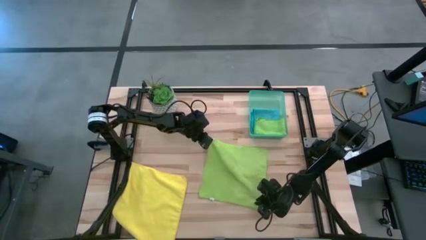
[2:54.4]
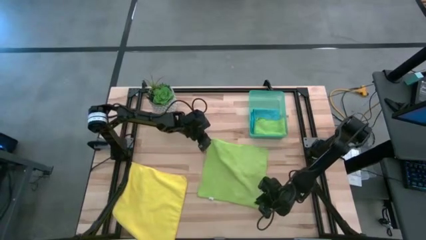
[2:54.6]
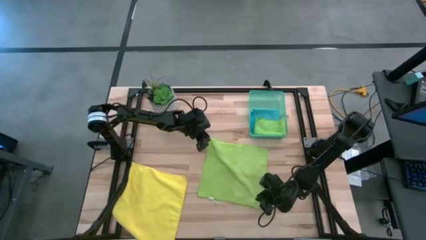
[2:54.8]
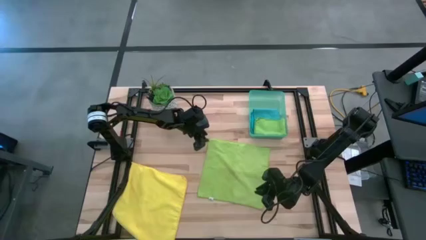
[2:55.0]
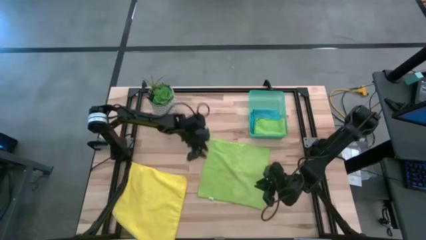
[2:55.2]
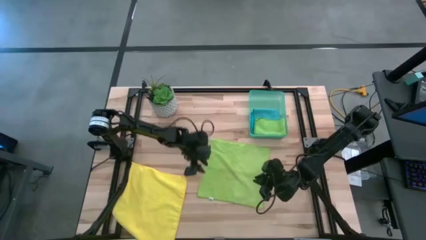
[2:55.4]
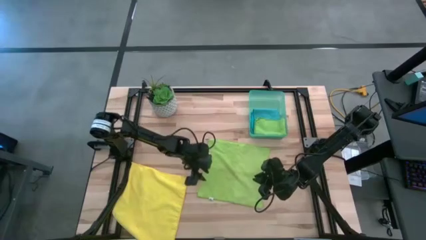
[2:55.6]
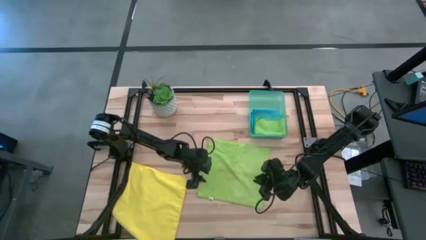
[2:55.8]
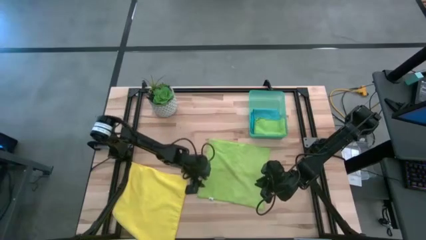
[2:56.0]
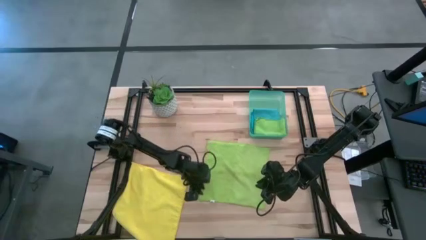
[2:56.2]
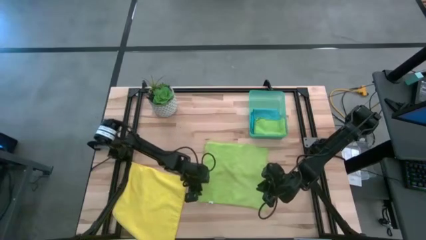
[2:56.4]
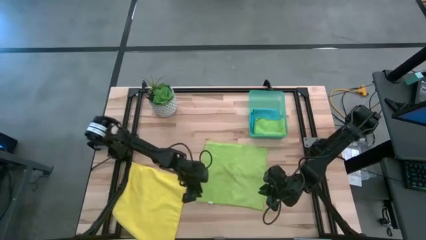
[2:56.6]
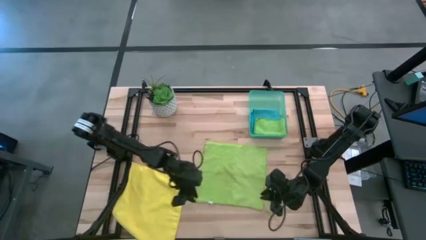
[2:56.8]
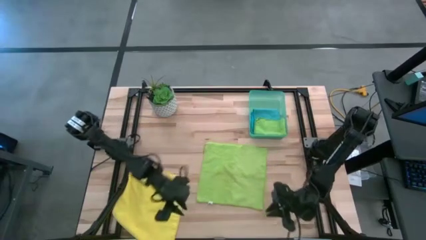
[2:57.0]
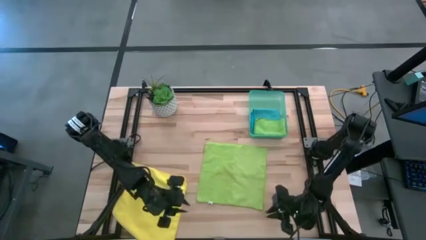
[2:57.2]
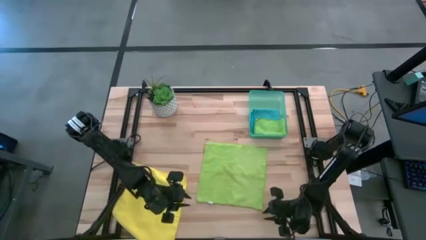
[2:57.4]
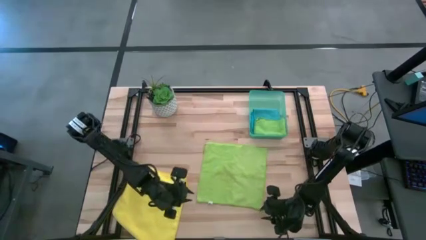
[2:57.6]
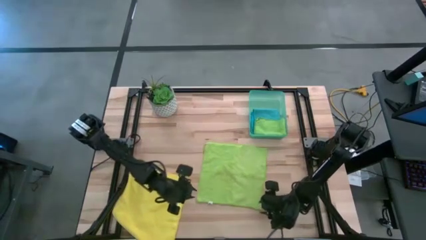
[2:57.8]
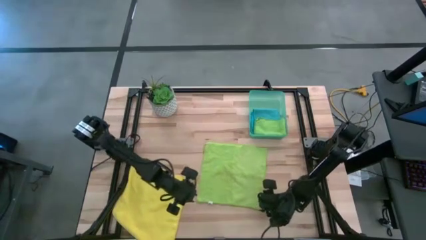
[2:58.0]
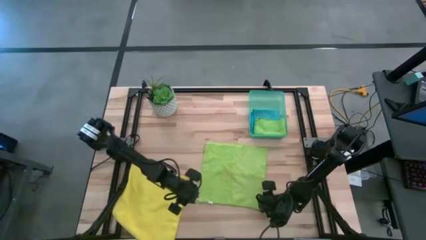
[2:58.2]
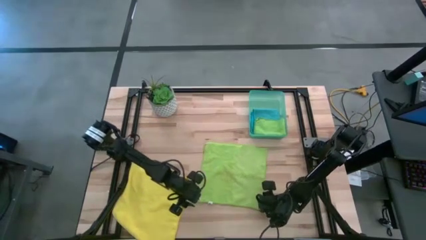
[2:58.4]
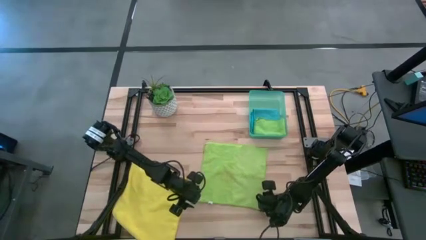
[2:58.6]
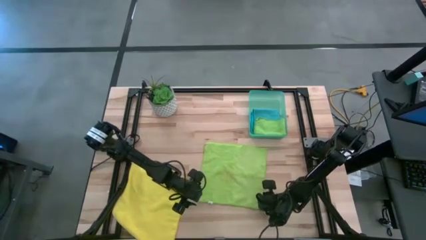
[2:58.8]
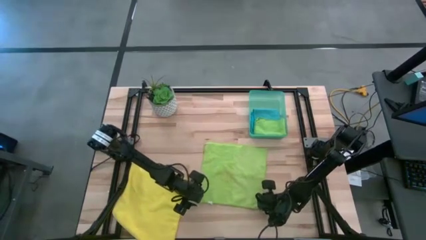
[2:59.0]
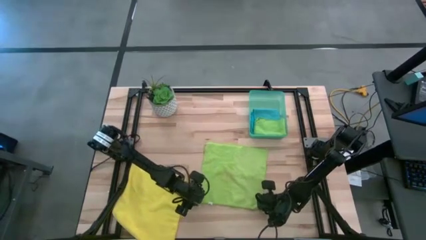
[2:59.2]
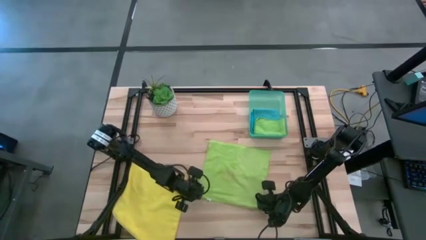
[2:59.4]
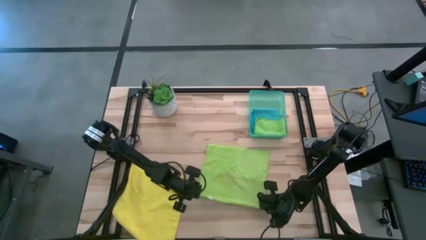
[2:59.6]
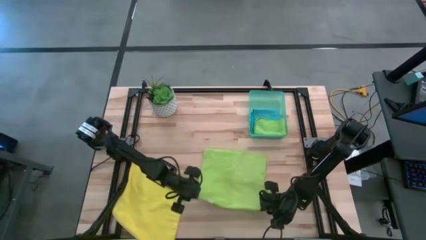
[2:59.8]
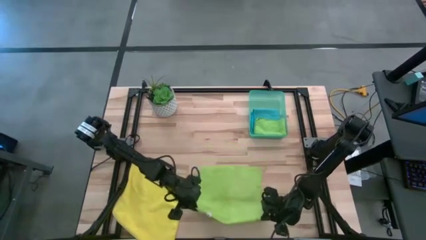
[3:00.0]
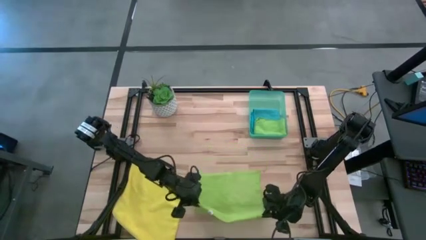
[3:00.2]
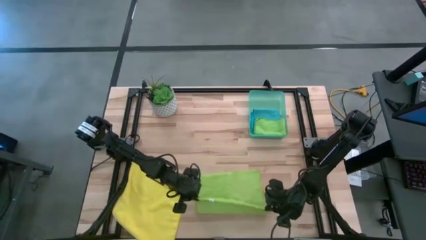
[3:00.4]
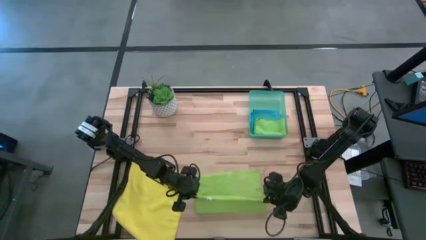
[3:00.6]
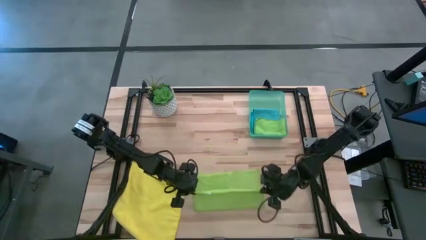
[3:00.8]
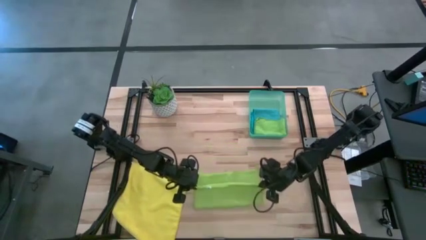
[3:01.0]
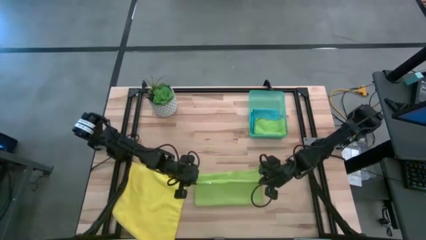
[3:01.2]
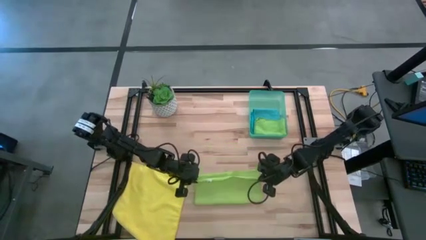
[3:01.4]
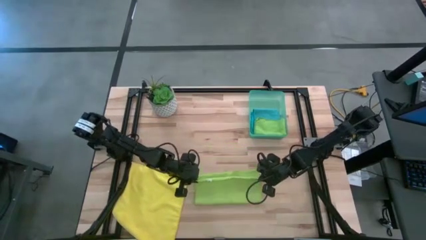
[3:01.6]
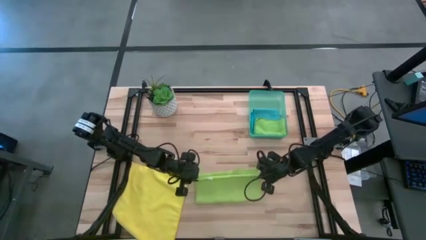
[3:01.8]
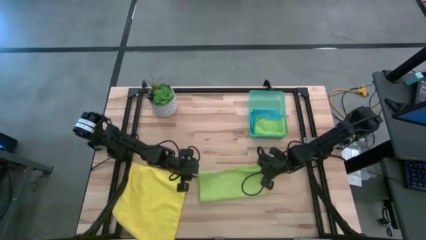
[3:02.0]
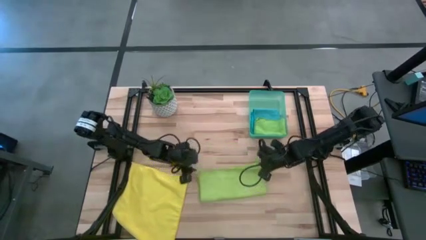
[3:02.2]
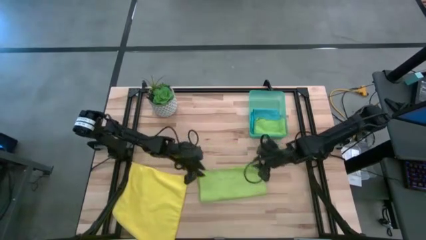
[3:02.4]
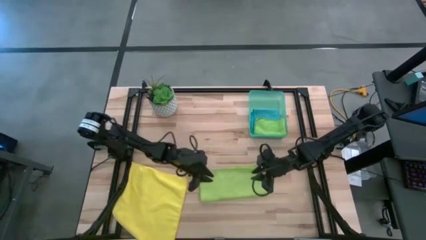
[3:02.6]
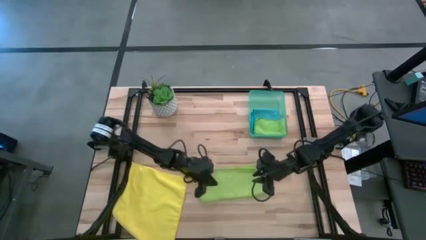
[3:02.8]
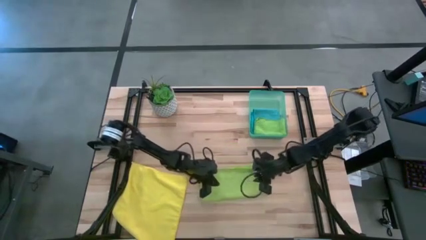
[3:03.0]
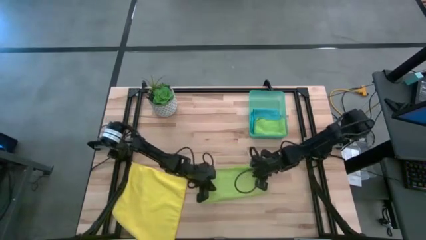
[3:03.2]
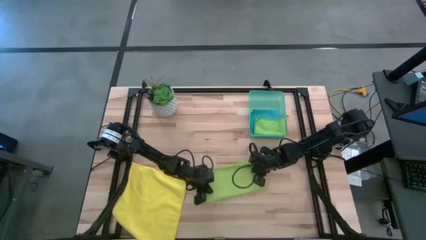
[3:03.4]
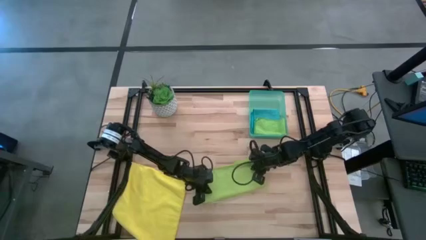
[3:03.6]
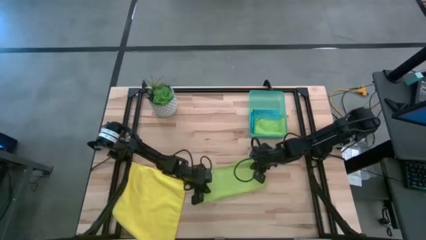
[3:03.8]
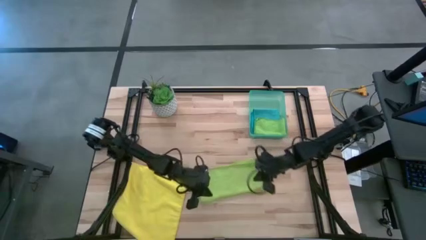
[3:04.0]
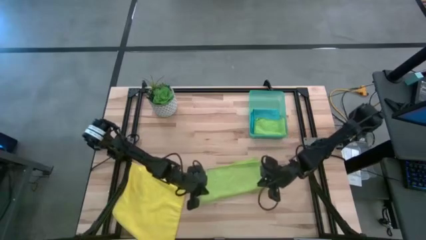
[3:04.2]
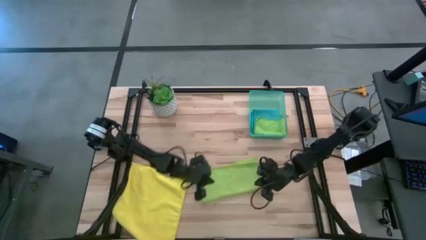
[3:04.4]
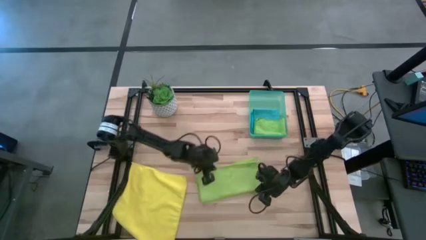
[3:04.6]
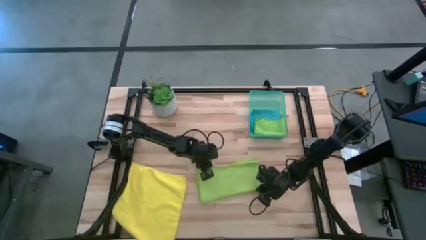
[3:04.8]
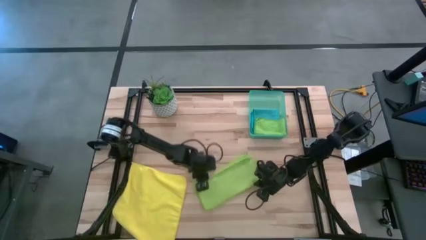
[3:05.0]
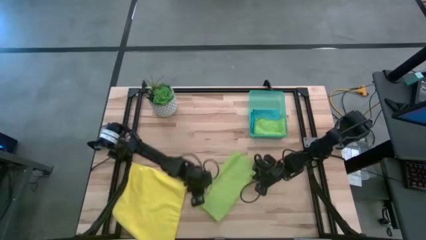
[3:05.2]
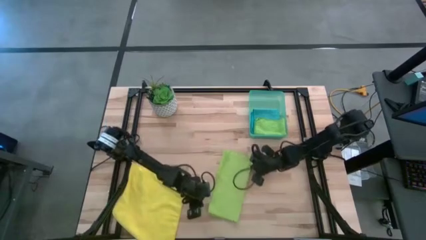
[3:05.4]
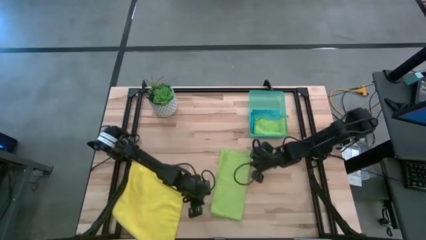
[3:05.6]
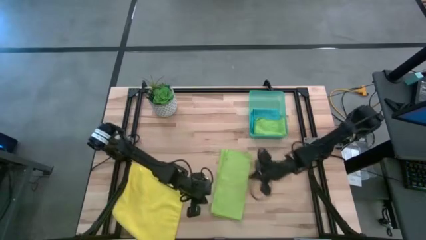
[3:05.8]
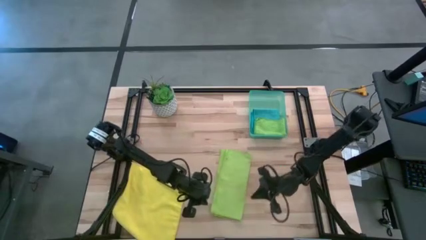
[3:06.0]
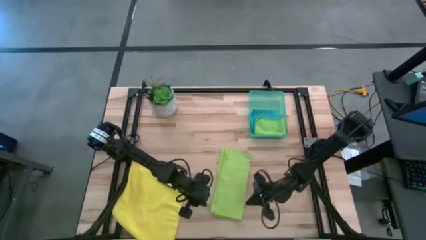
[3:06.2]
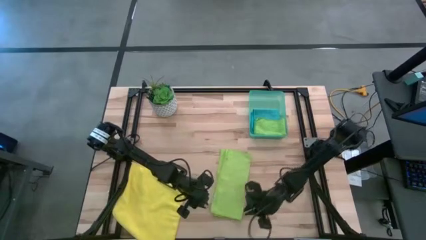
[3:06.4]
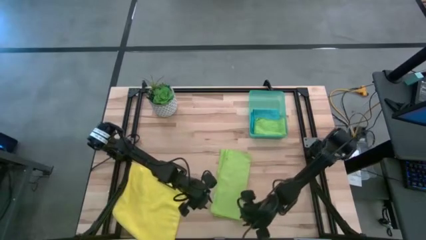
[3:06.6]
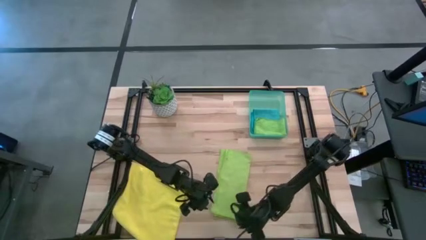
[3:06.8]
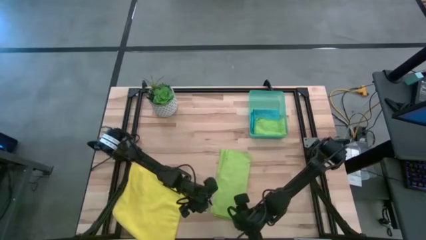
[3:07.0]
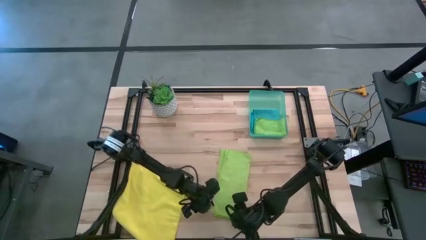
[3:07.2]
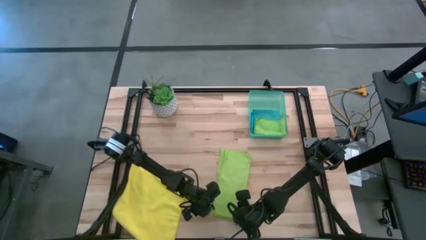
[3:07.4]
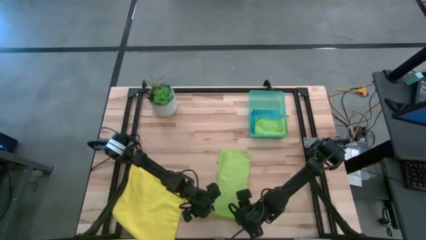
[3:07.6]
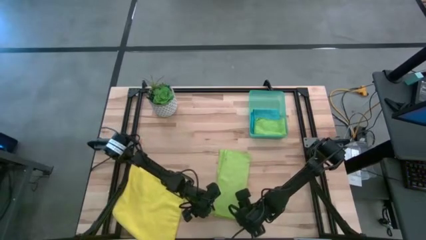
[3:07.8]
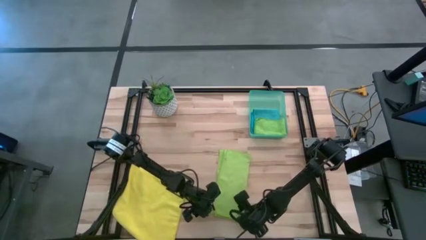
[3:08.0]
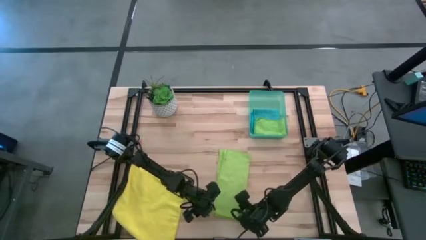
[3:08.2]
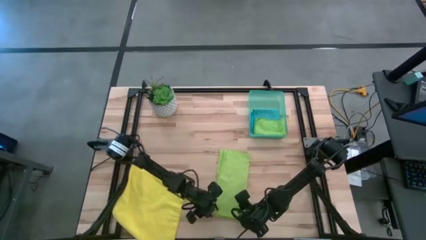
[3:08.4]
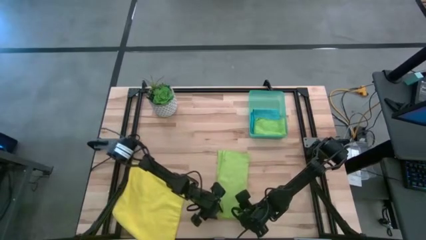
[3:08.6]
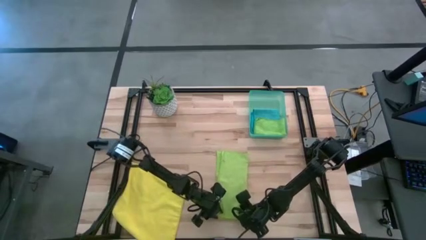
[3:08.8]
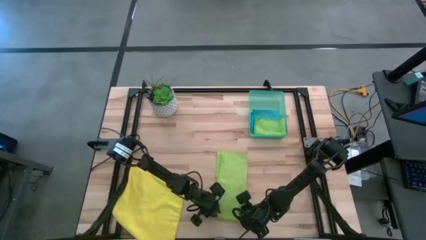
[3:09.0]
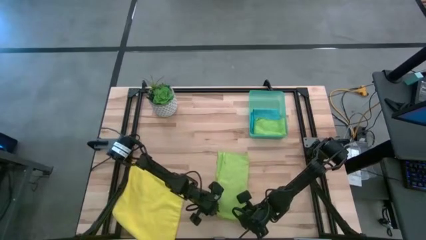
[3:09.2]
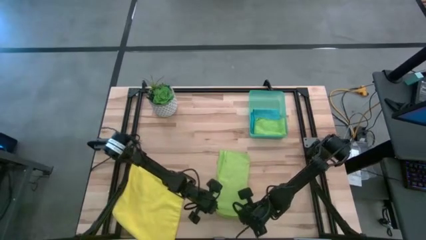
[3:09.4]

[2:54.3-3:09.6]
Task: Fold microfiber towels
Fold the light green towel
